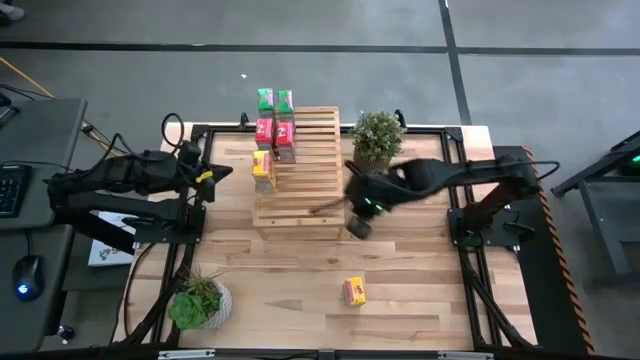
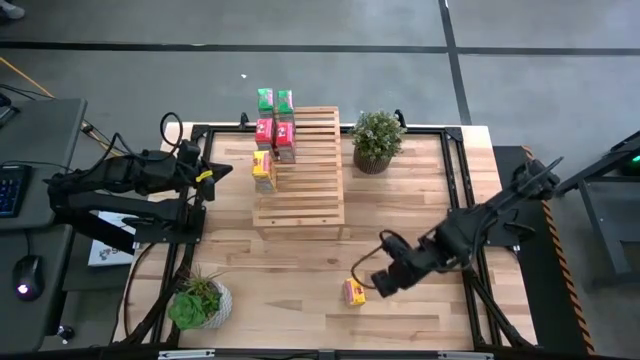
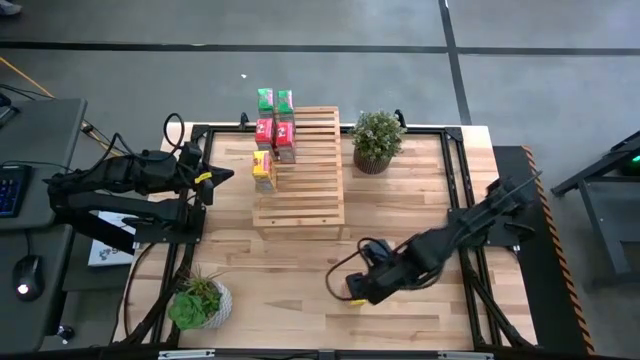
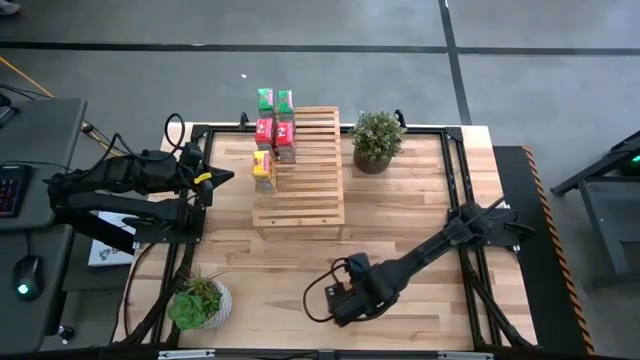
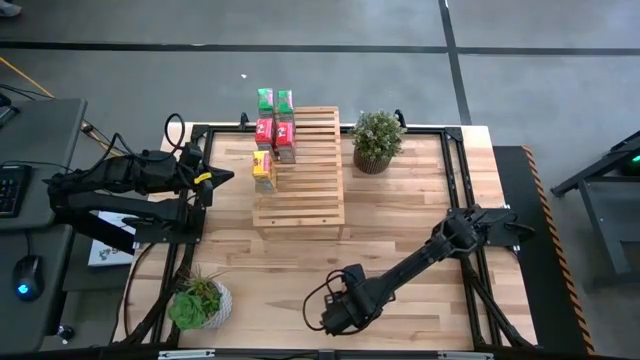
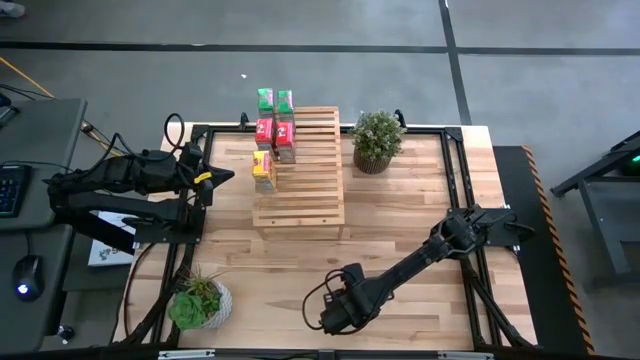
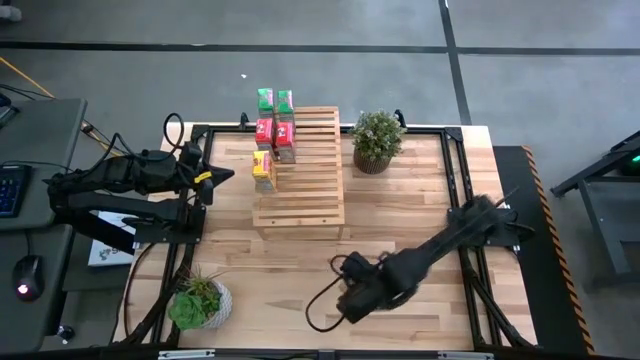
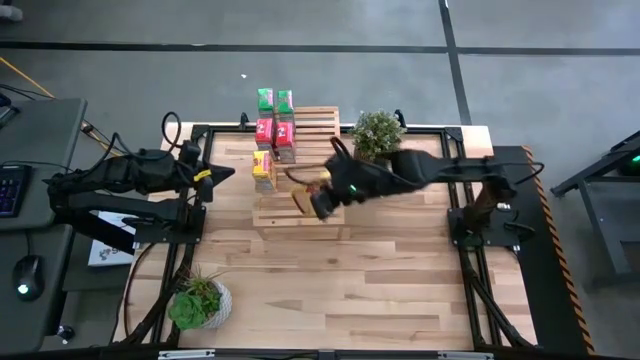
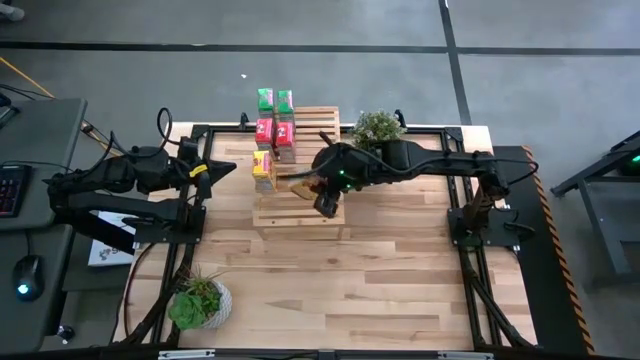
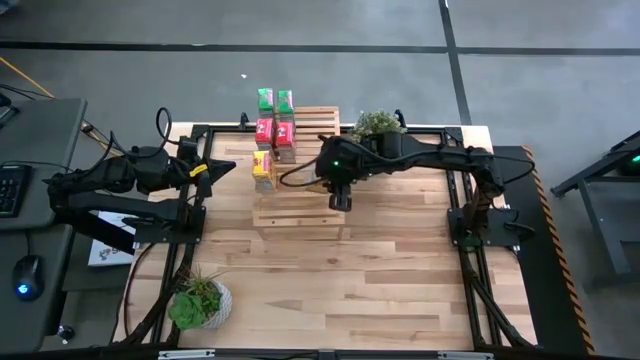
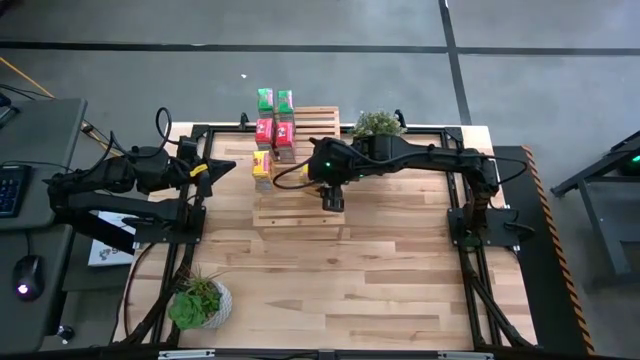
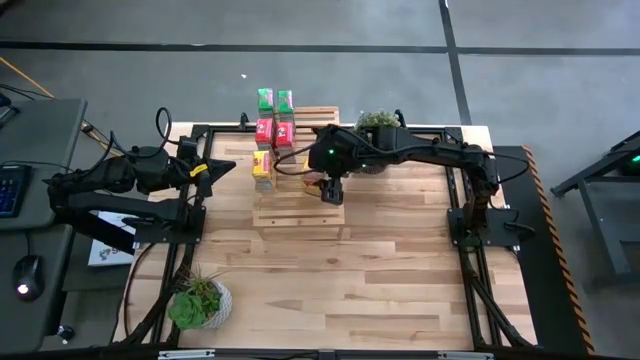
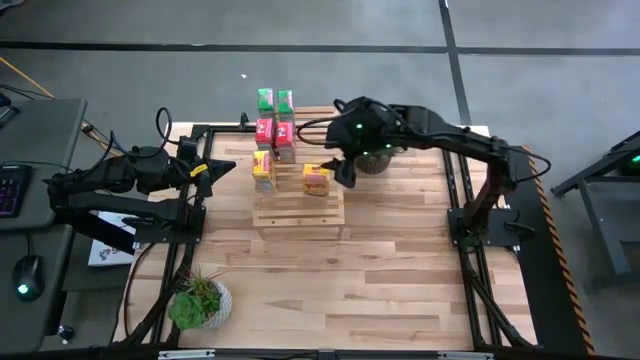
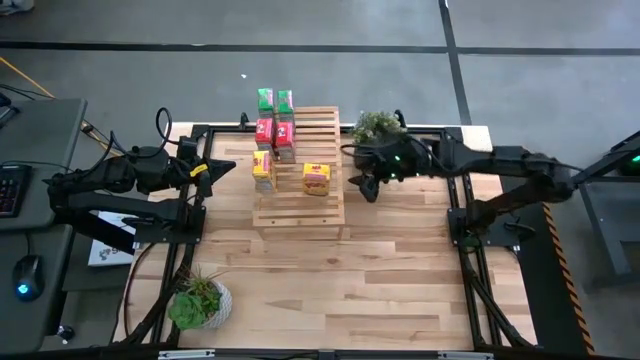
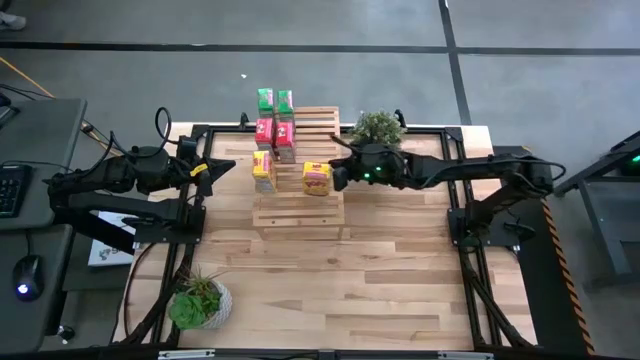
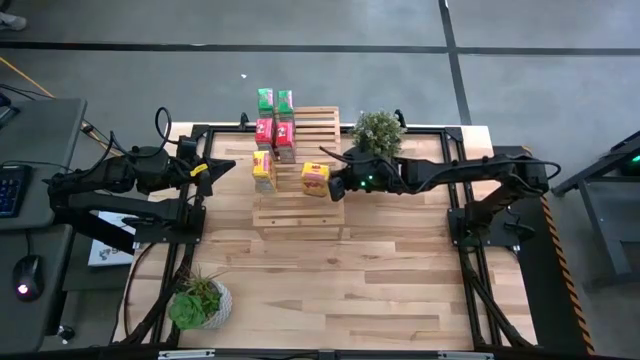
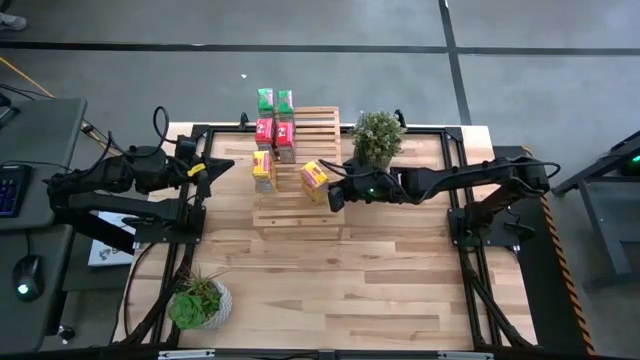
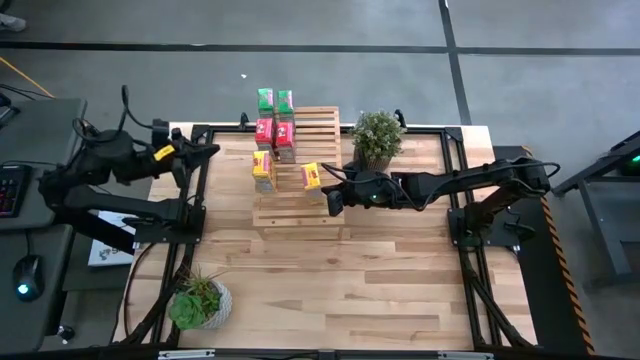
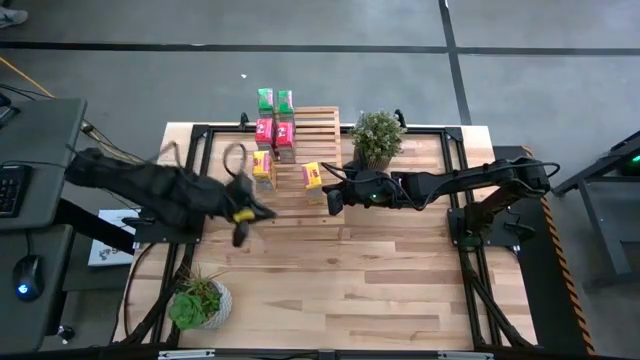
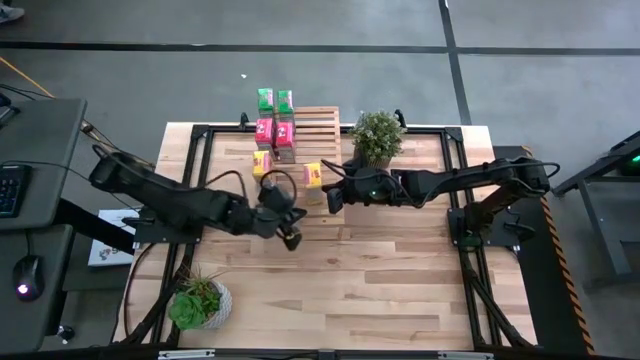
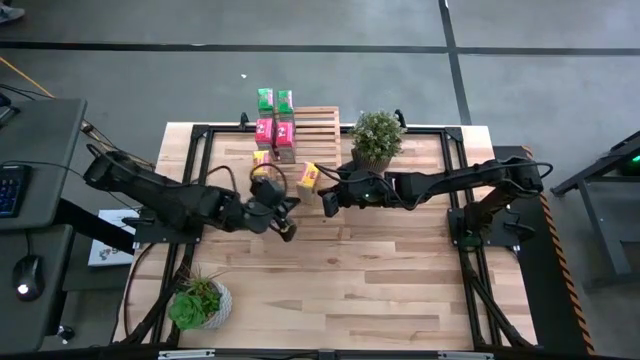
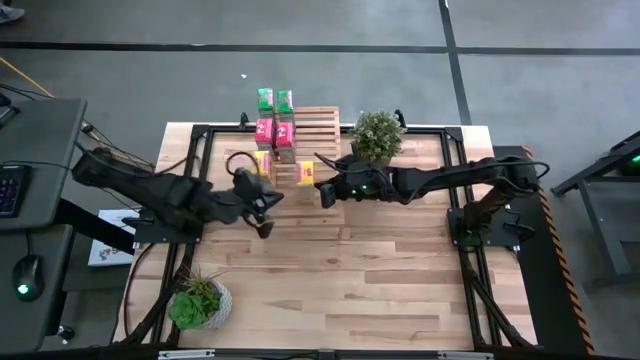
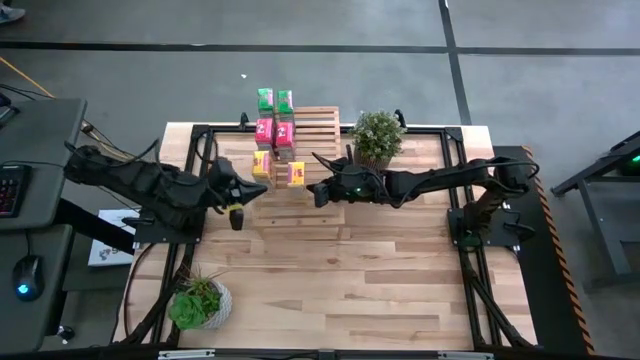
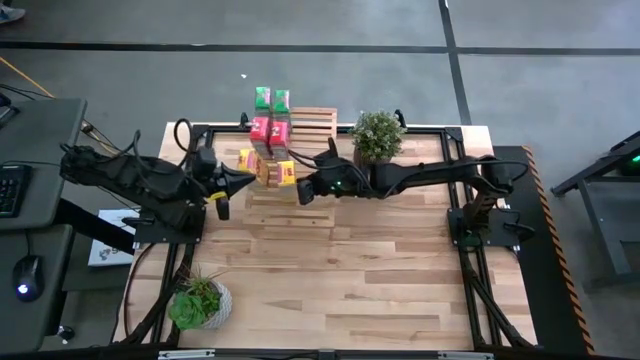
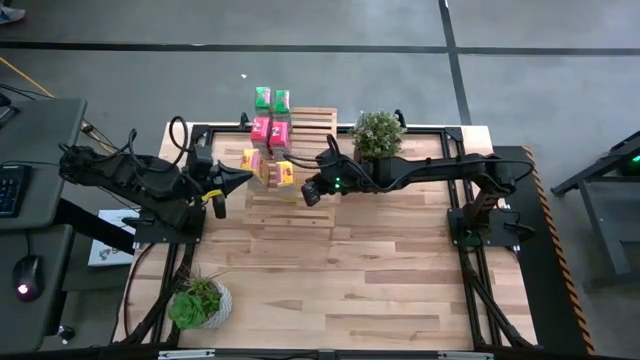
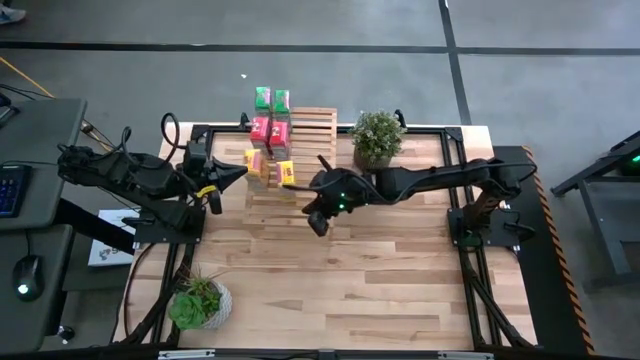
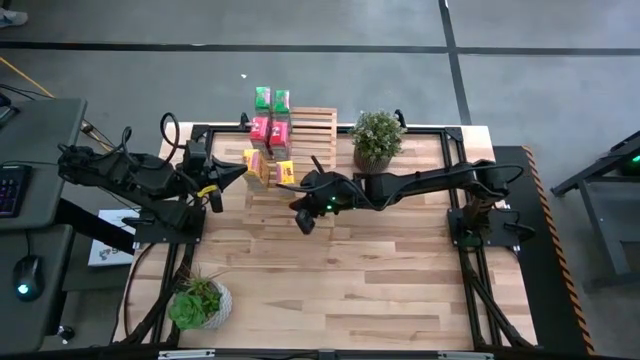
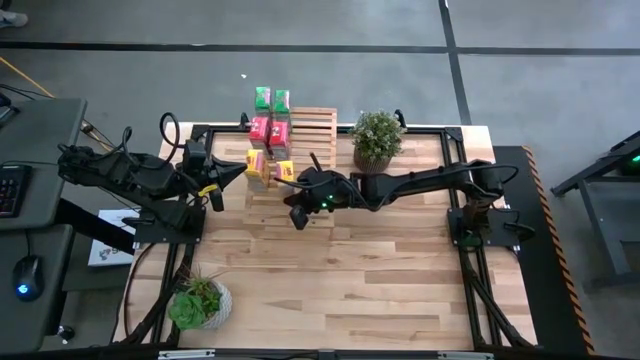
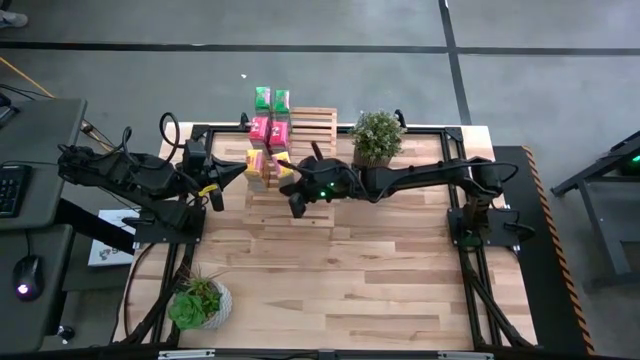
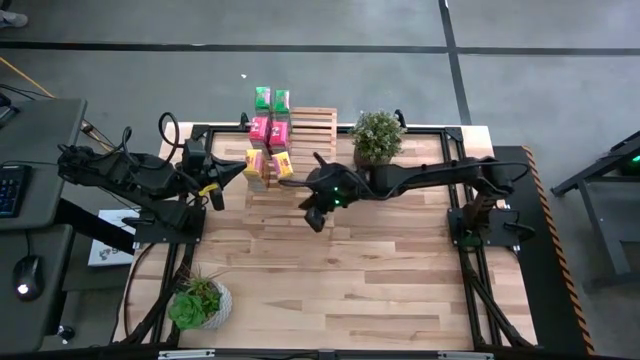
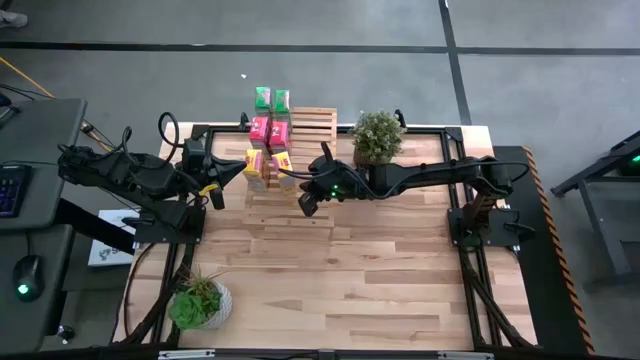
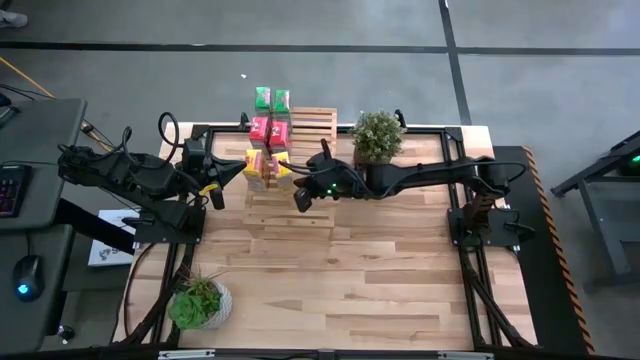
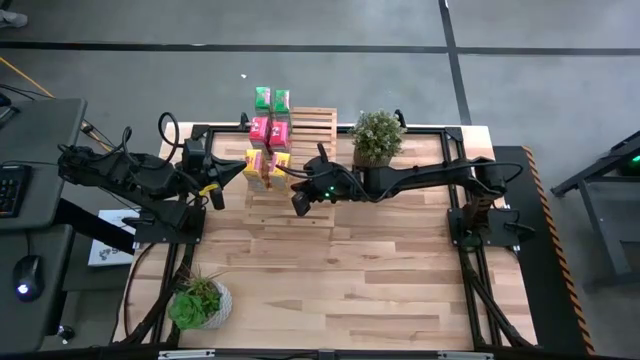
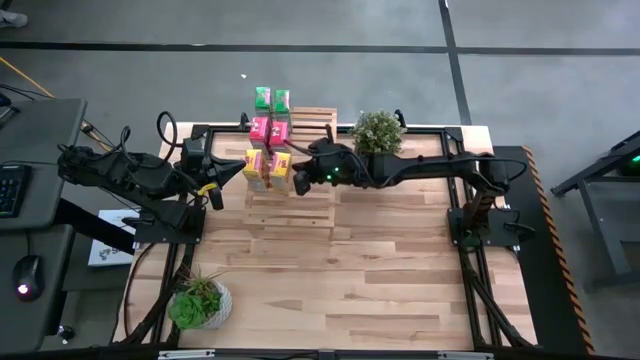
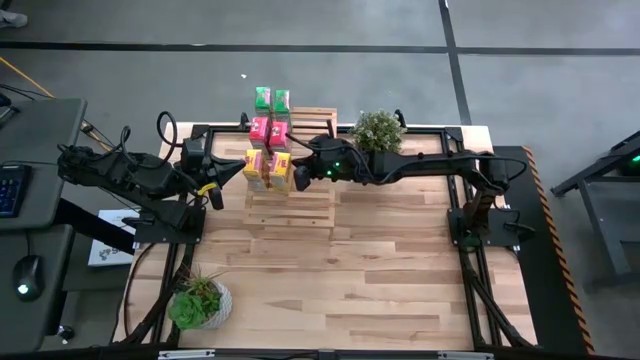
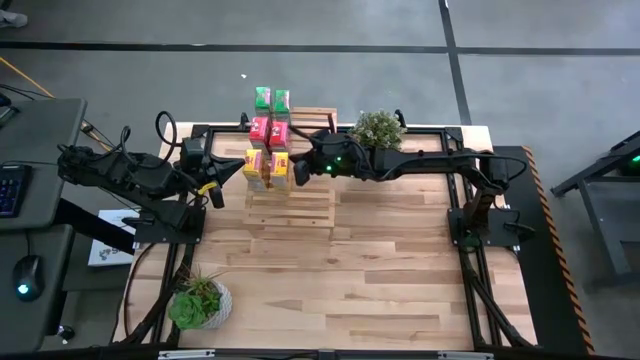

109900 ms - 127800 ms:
Task: Stack cereal on shelf
Put the yellow cereal box aligned with the other yellow cereal box on the shelf

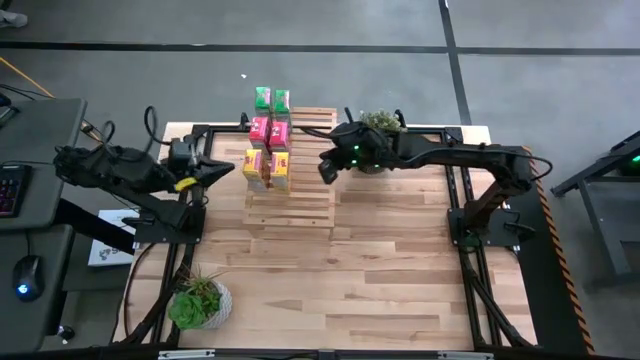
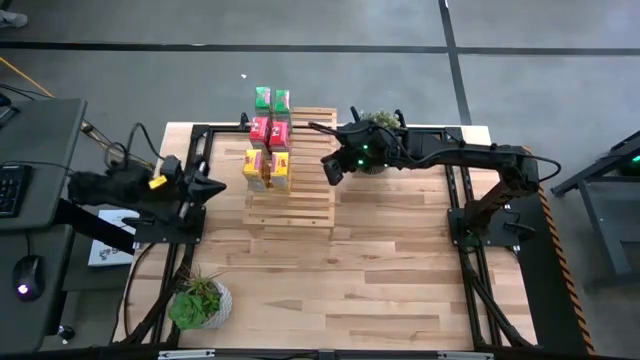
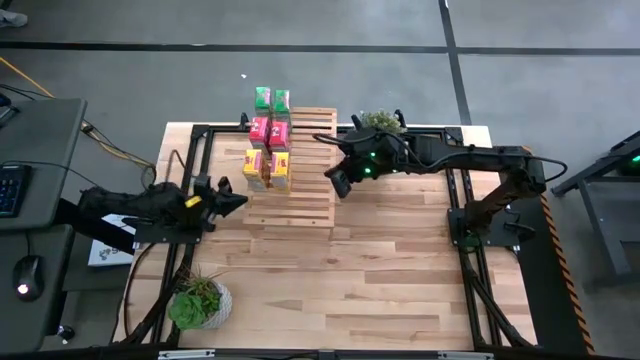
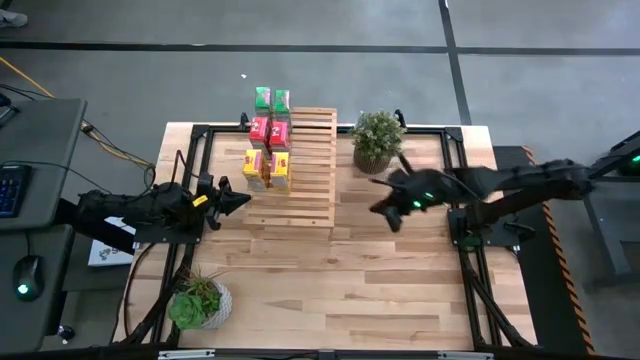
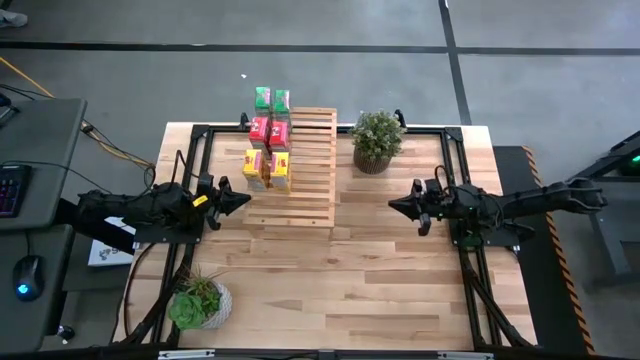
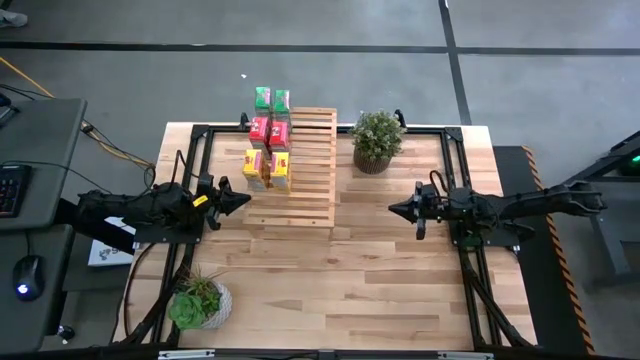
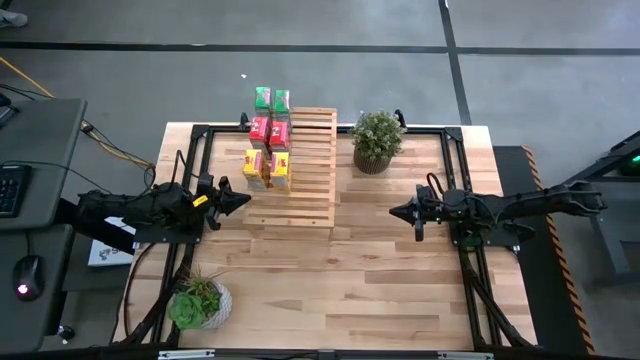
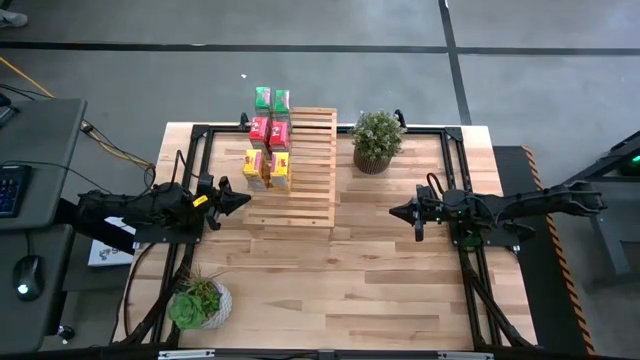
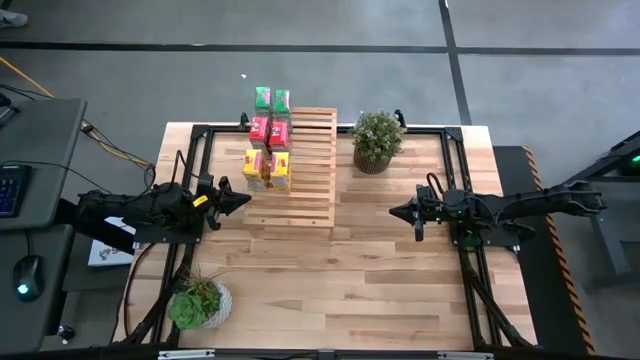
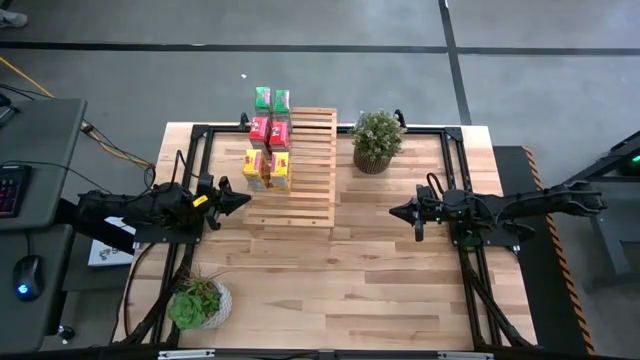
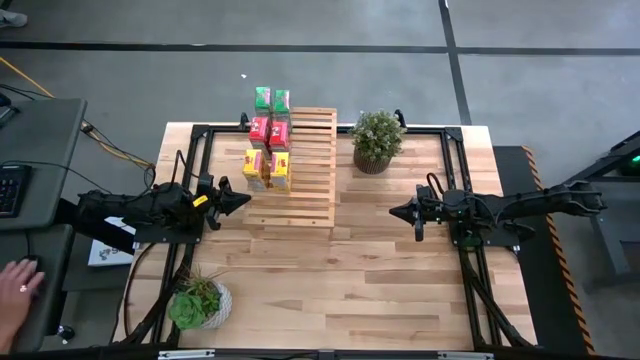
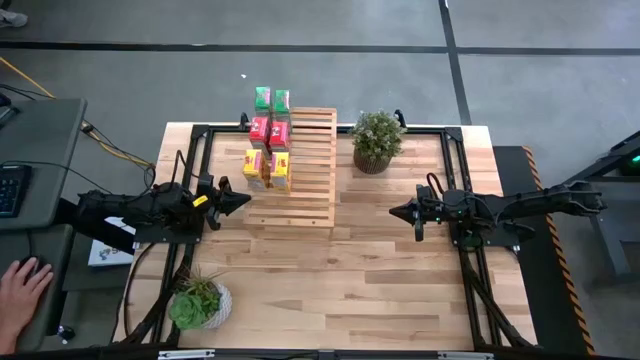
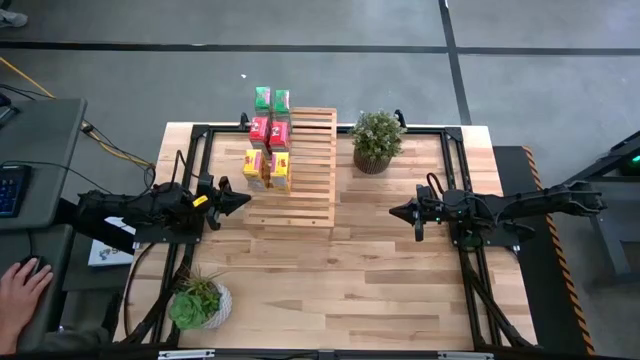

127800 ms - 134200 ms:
Return to home position
